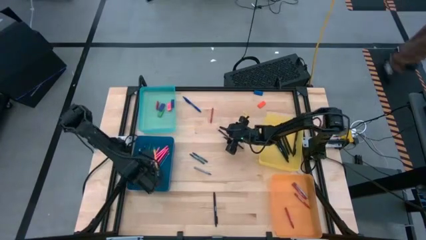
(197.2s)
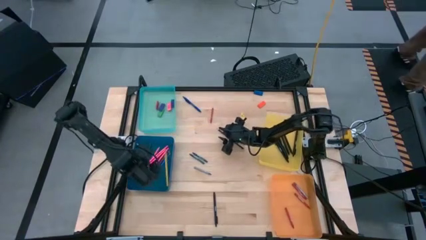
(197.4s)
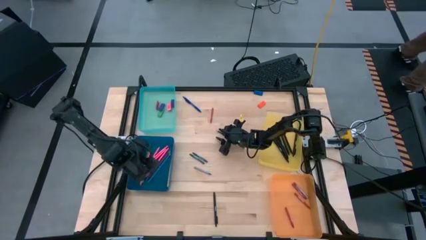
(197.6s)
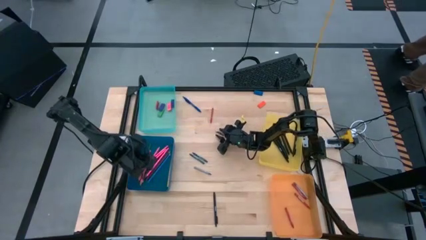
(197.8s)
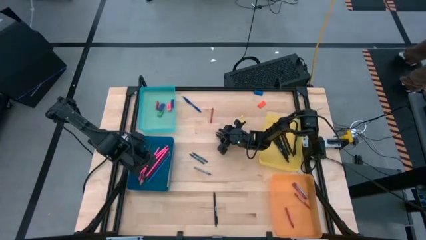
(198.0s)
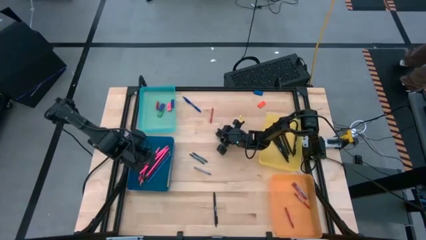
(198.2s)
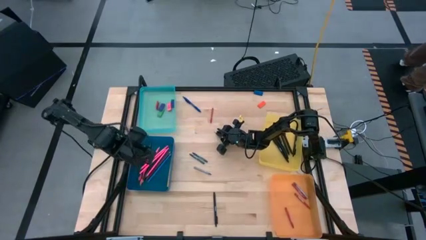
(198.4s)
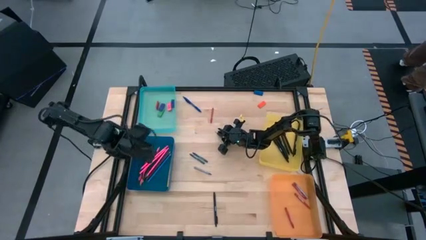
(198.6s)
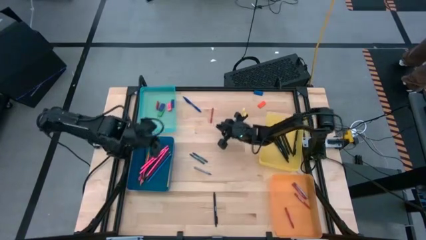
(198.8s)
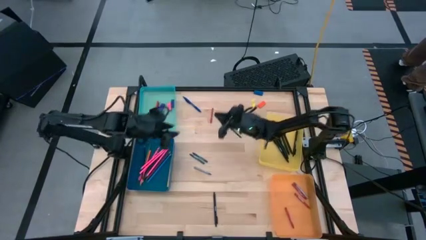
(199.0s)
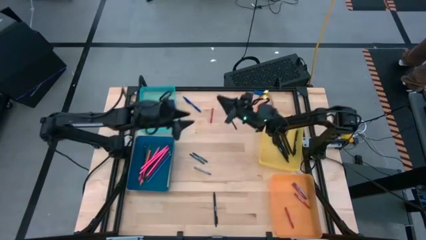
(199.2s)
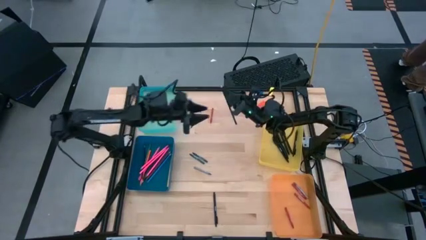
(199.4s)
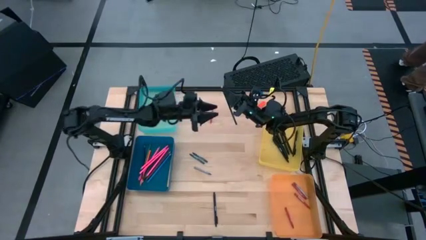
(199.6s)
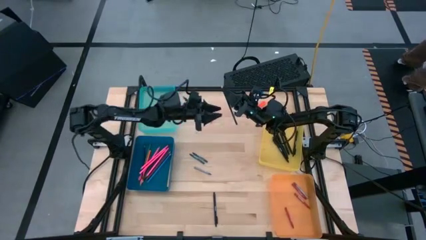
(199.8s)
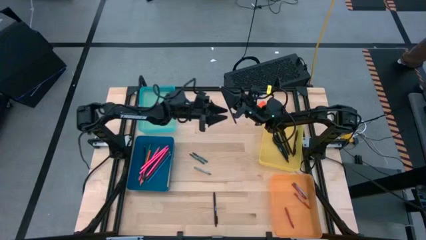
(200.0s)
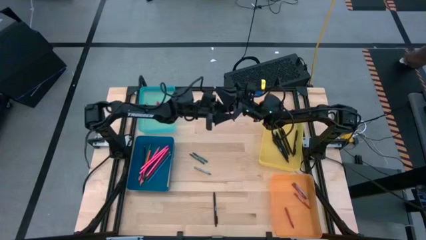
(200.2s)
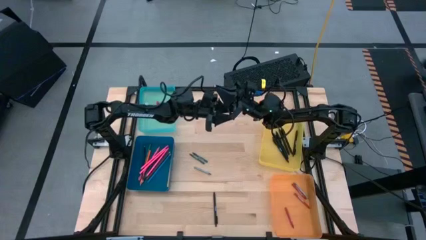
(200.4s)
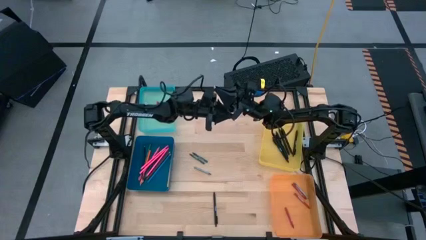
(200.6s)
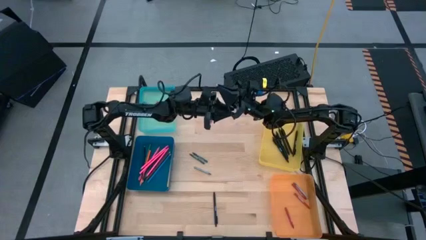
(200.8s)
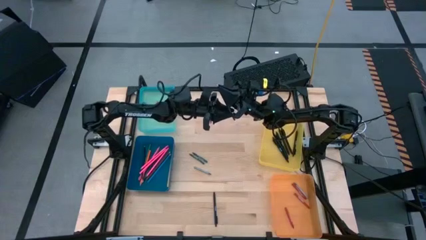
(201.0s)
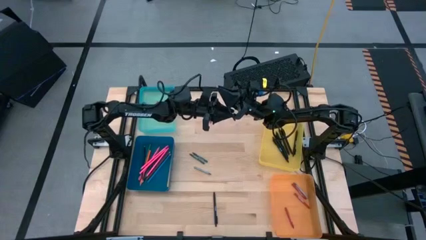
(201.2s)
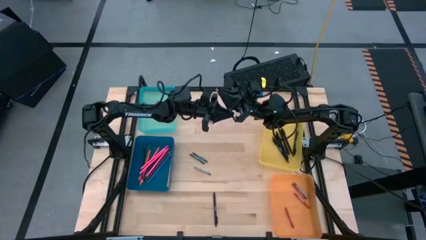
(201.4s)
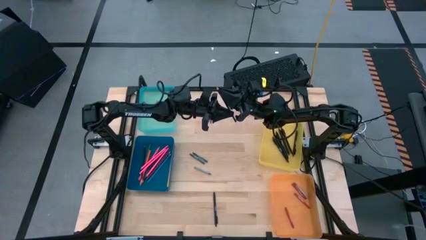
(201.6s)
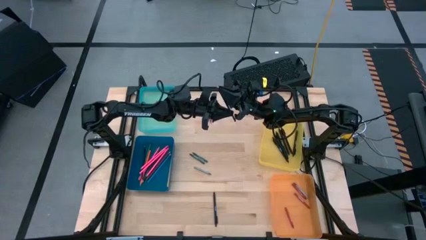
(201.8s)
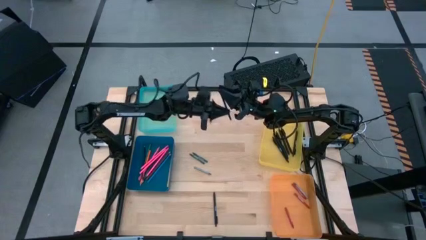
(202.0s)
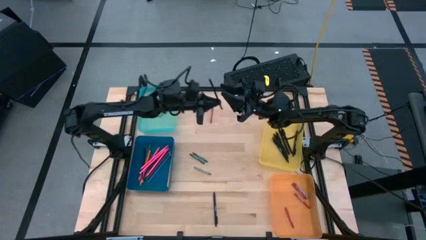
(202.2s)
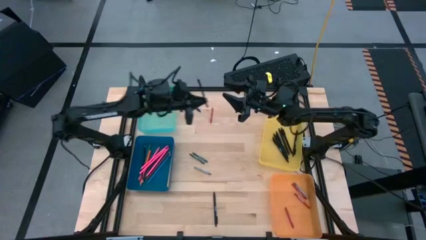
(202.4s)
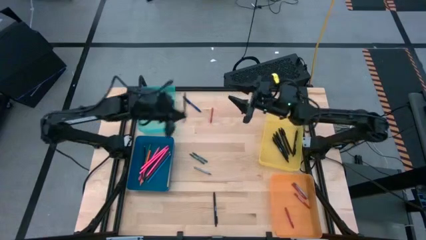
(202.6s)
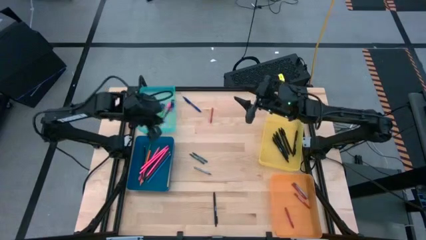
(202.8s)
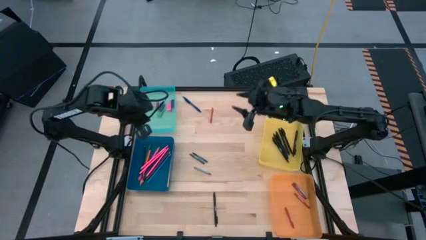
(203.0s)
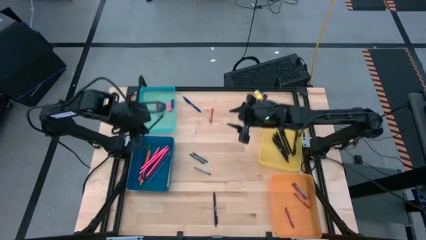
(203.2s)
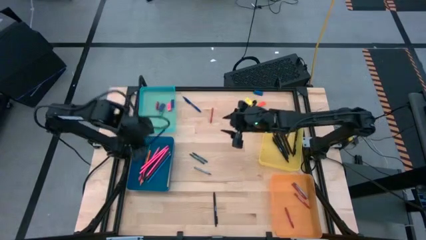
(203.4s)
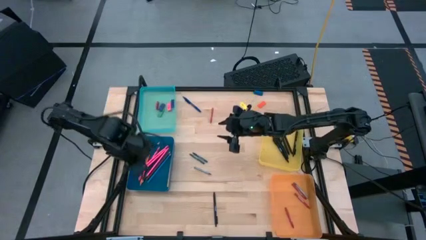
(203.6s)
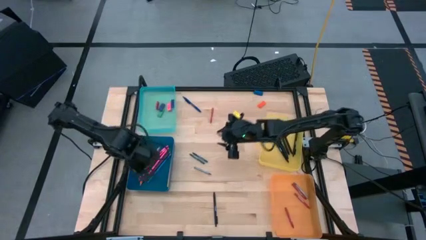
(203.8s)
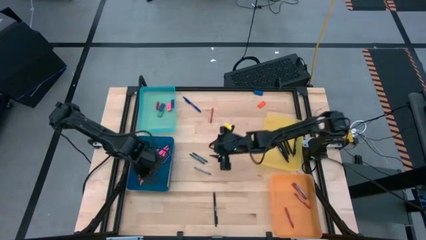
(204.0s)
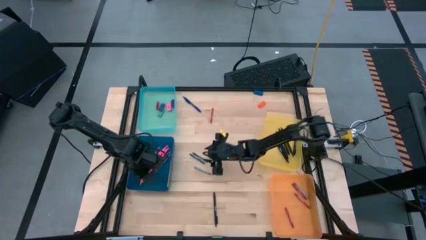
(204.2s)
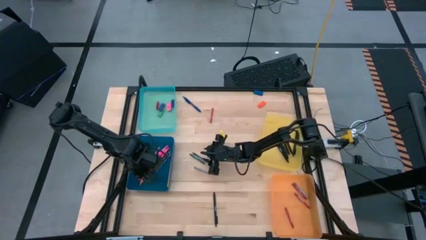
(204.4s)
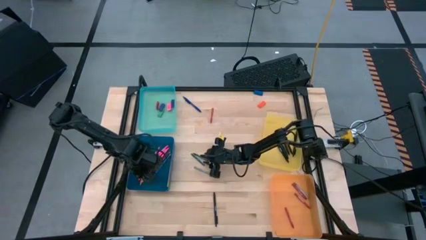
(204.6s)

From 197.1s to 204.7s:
Task: Sort crayons/erasers/pens/pencils in bins
Put the dark blue colored pencil into the blue bin

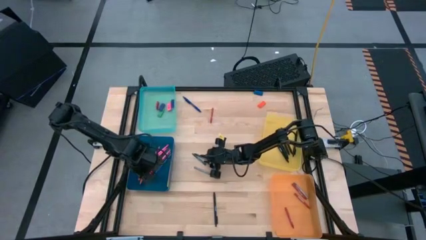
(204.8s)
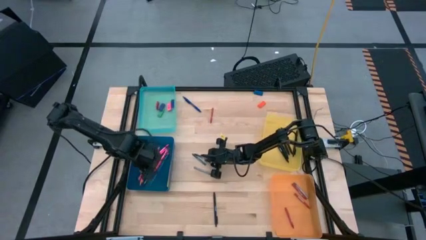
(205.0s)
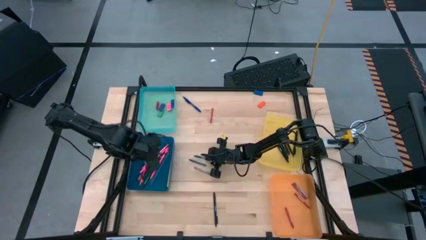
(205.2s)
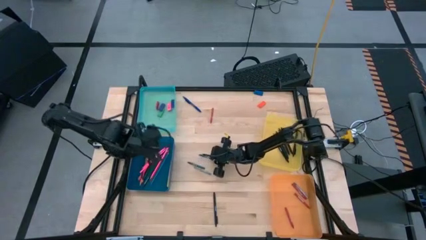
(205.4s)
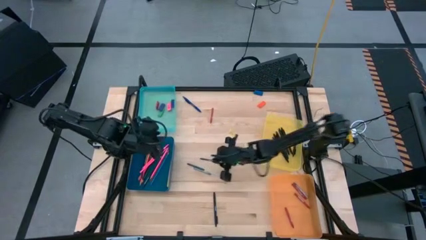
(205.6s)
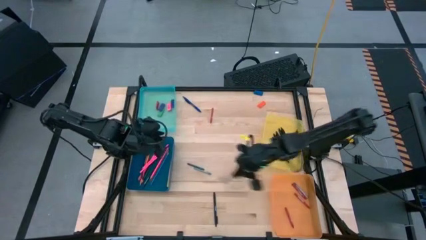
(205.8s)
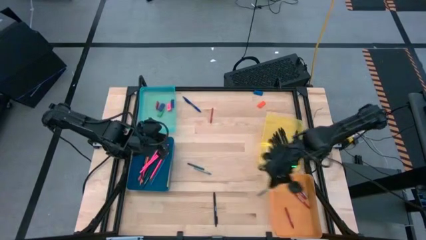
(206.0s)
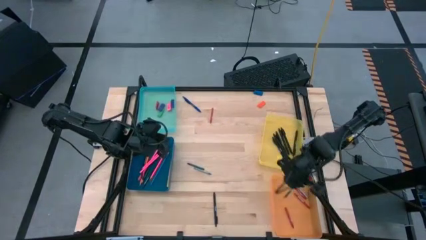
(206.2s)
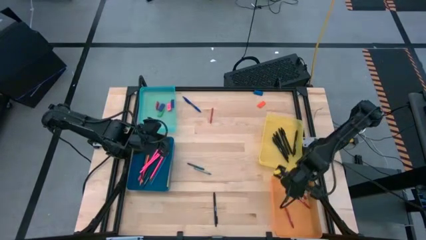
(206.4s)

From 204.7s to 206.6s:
Put the green crayon into the orange bin

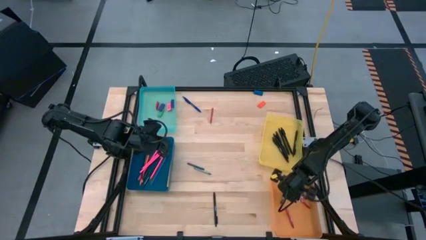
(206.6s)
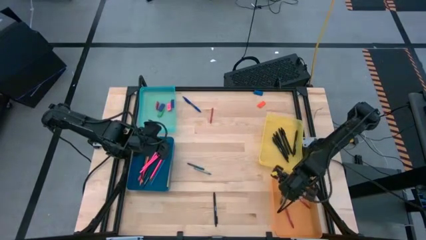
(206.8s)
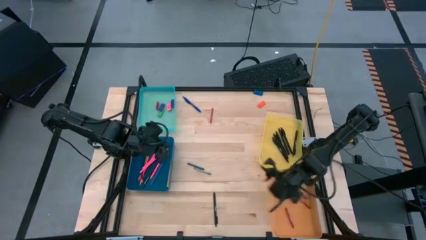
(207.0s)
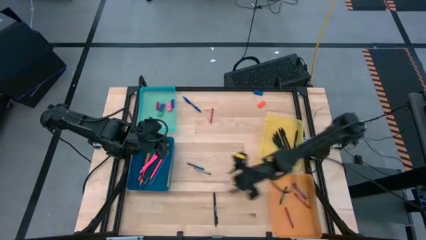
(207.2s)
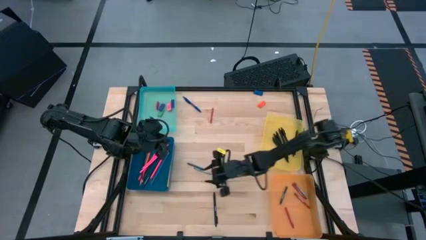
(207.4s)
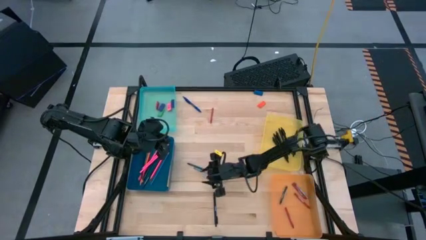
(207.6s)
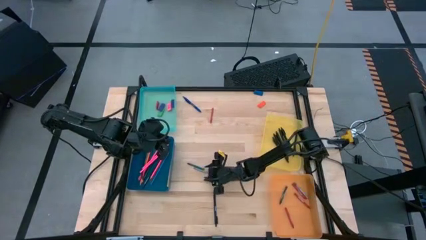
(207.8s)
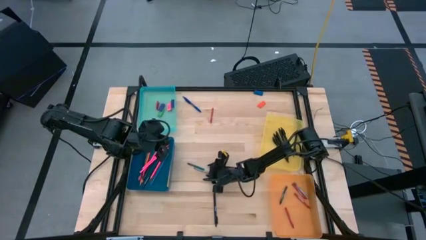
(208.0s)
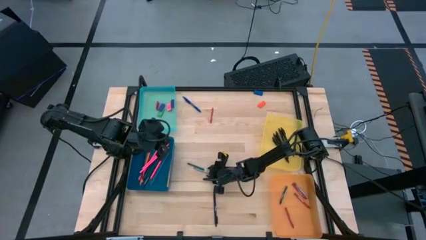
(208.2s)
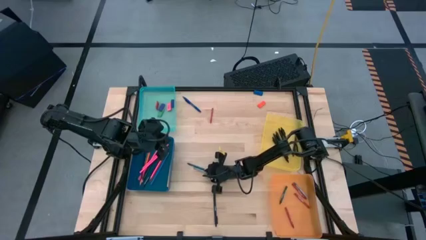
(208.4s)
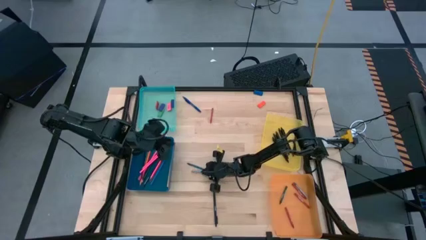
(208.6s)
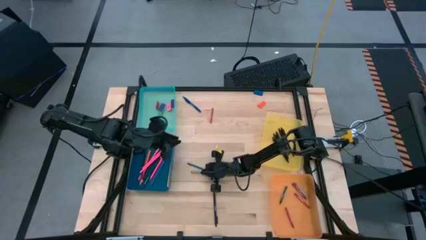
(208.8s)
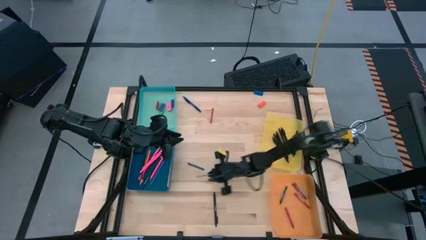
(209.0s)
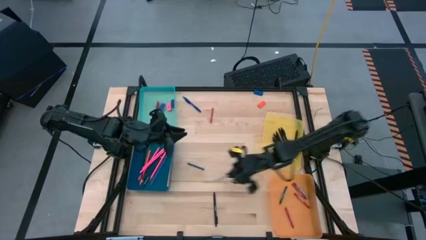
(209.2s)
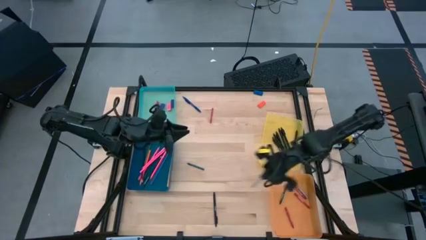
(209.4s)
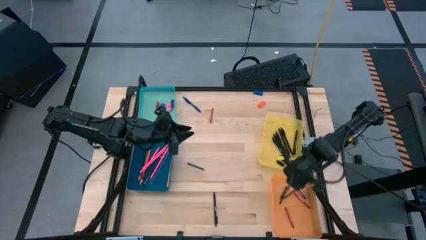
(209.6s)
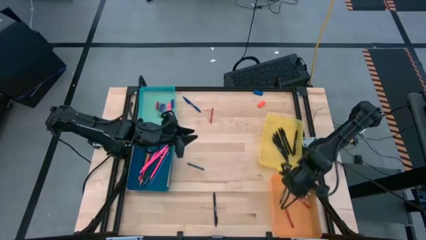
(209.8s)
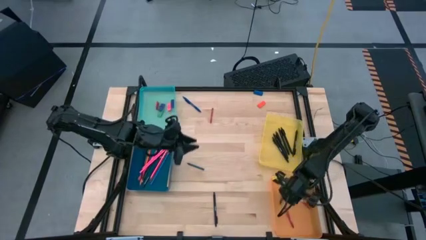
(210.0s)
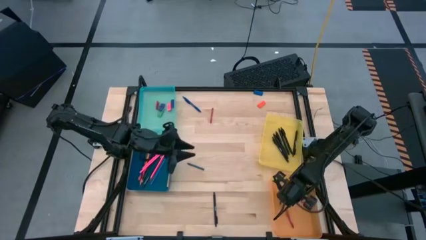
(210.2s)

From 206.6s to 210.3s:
Put the gray crayon into the orange bin

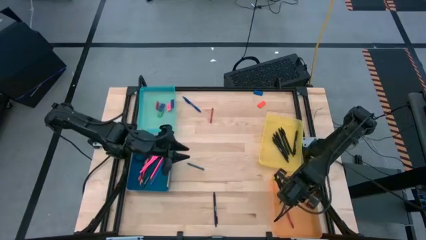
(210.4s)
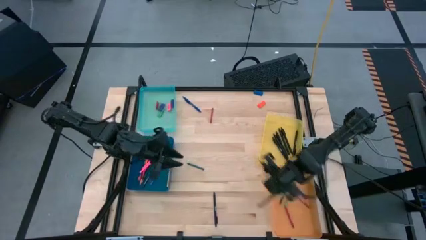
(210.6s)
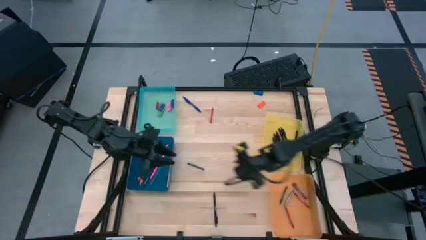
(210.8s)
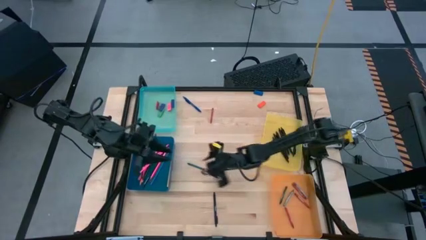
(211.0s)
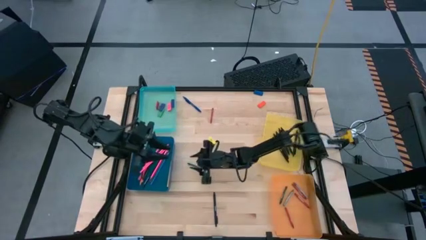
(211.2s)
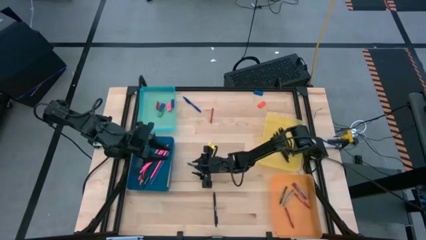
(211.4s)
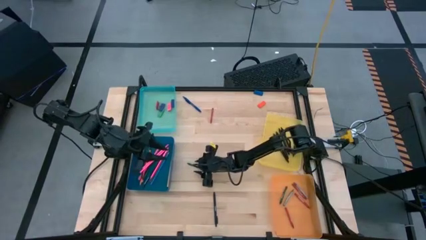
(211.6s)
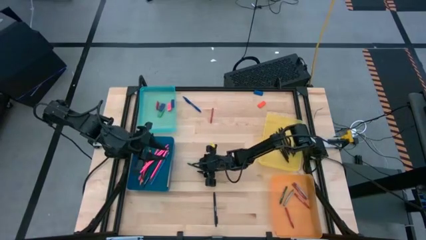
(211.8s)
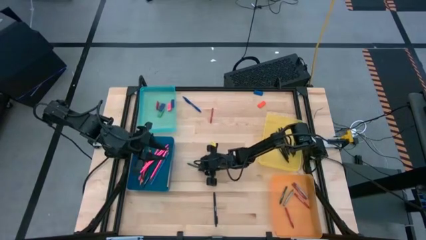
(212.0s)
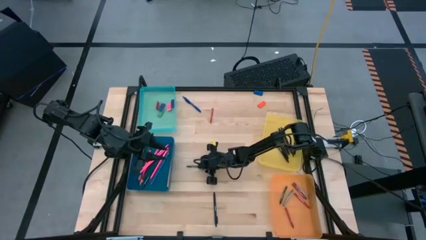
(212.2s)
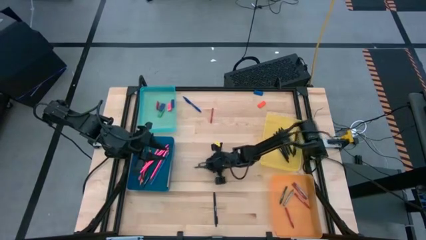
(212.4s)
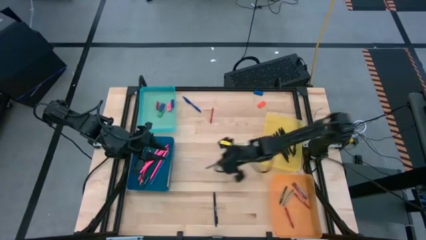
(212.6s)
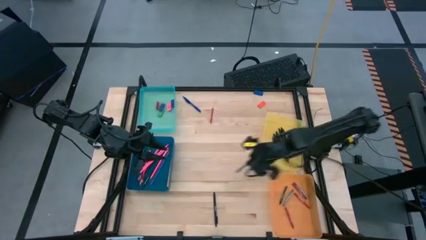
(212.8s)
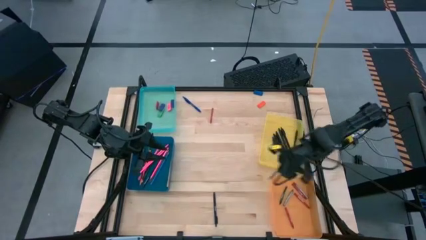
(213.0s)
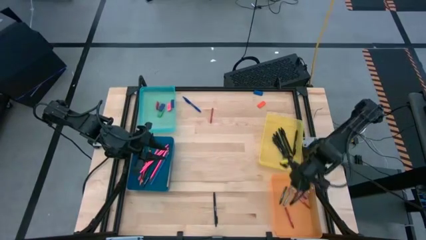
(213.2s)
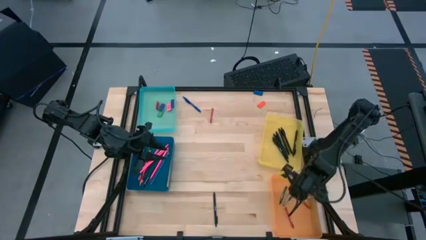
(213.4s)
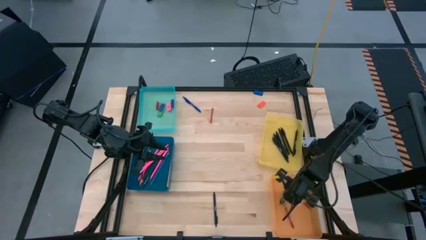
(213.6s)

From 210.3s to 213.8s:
Put the green crayon into the orange bin
